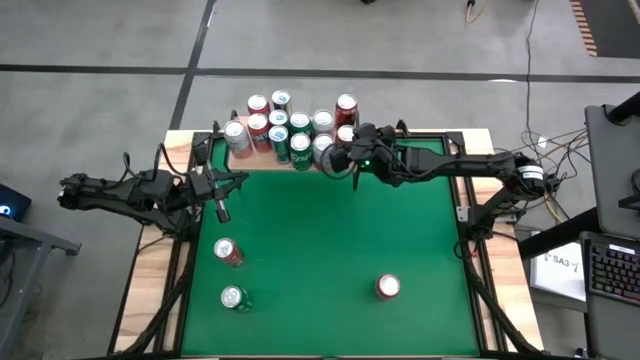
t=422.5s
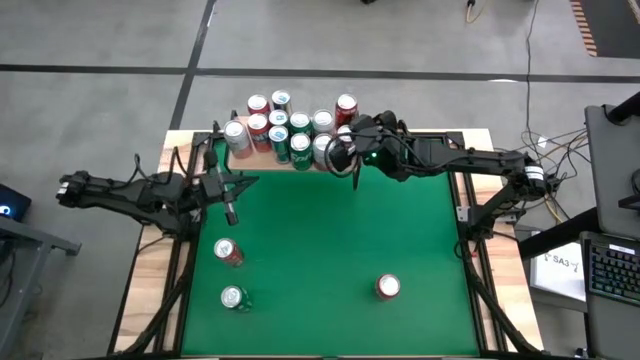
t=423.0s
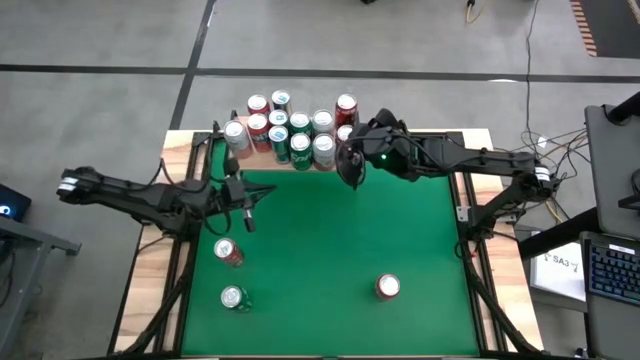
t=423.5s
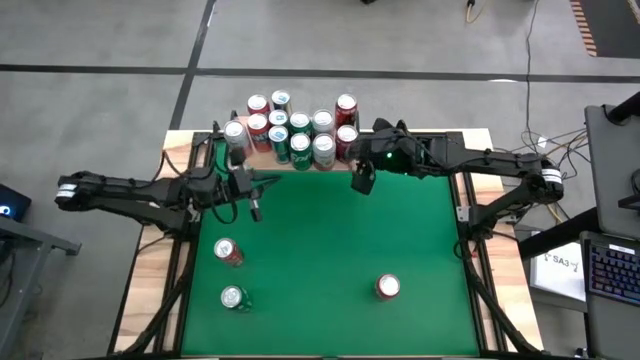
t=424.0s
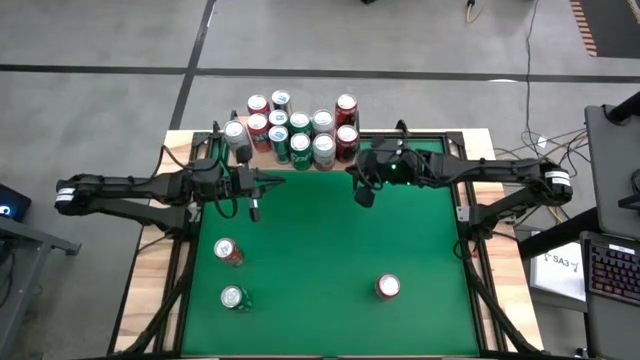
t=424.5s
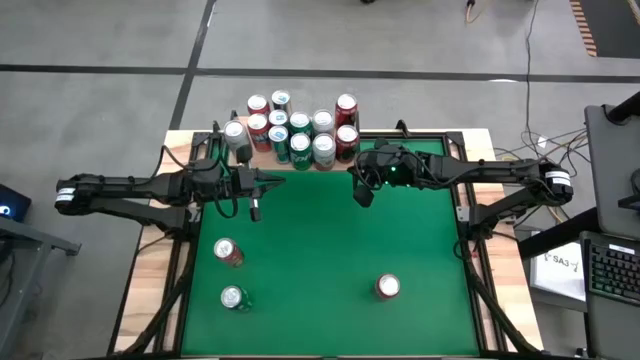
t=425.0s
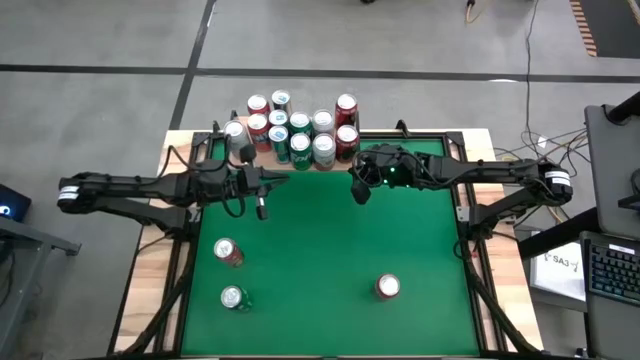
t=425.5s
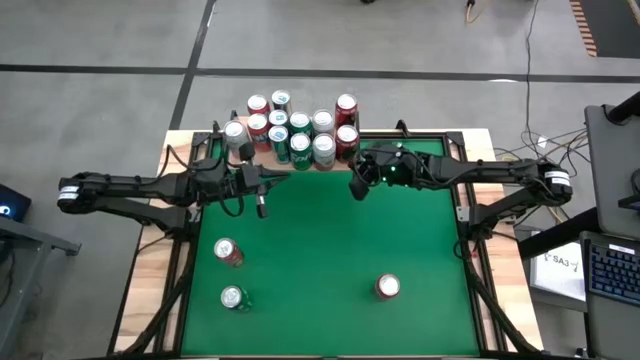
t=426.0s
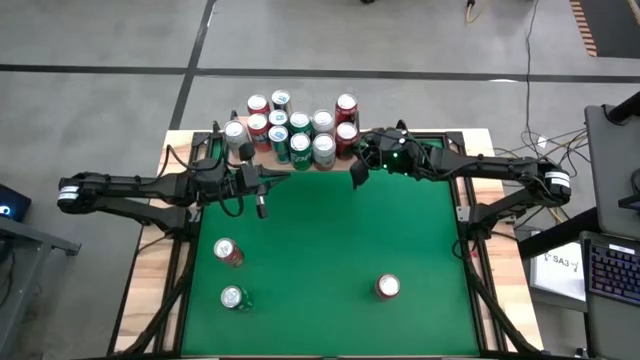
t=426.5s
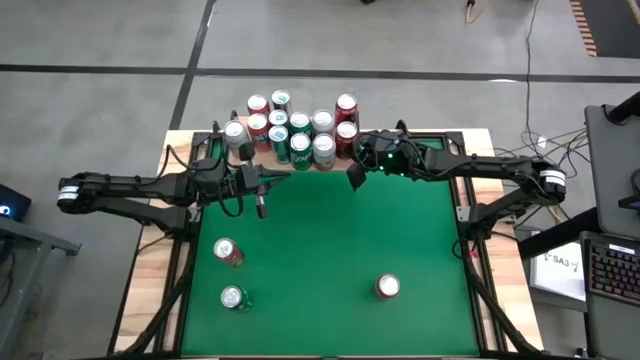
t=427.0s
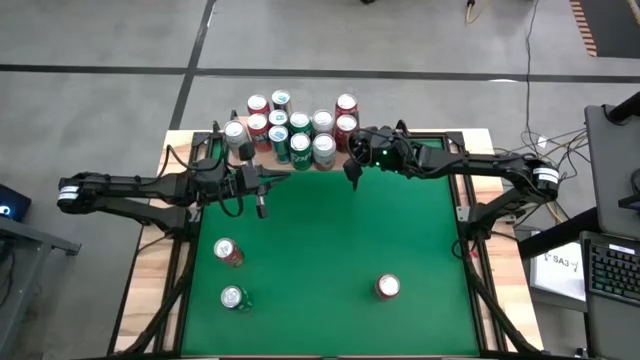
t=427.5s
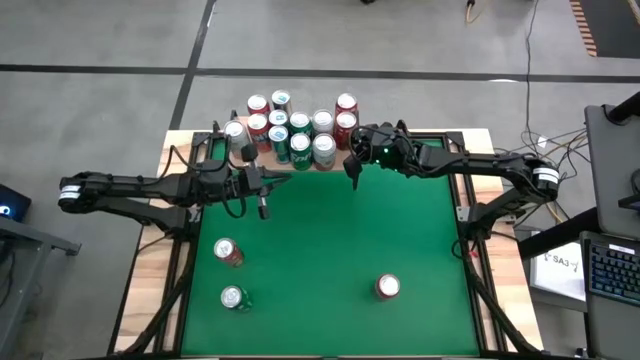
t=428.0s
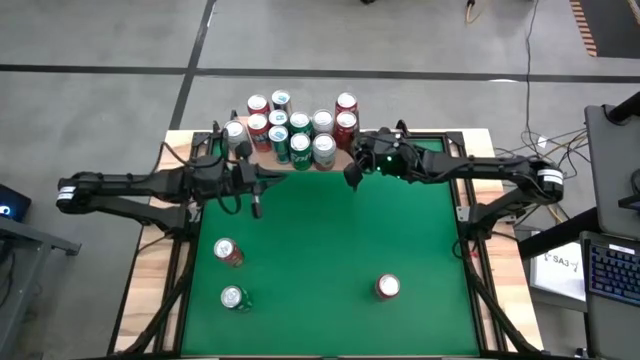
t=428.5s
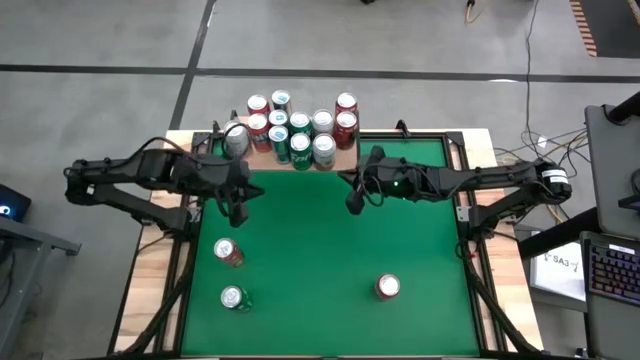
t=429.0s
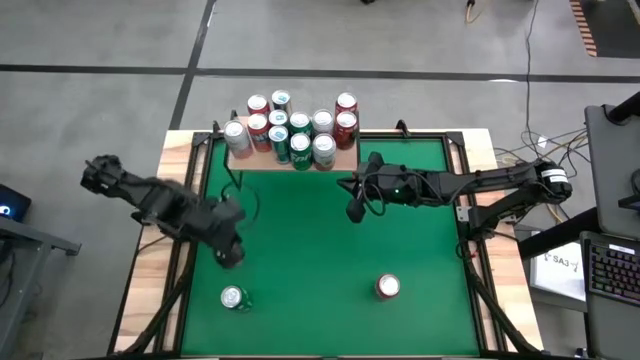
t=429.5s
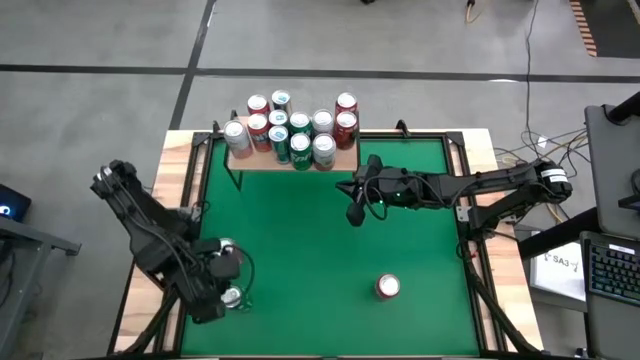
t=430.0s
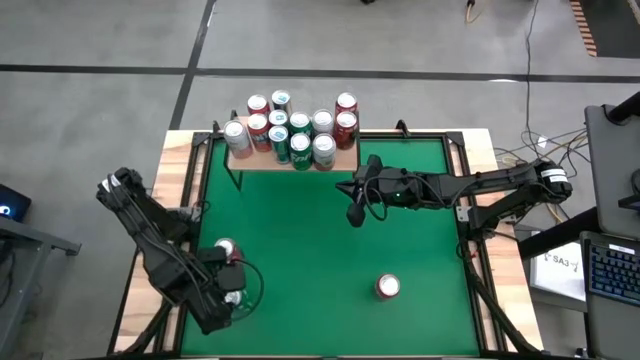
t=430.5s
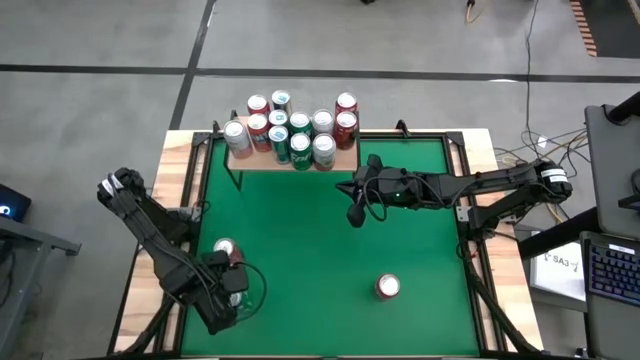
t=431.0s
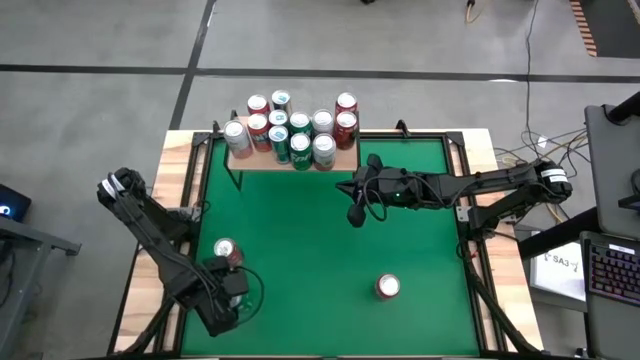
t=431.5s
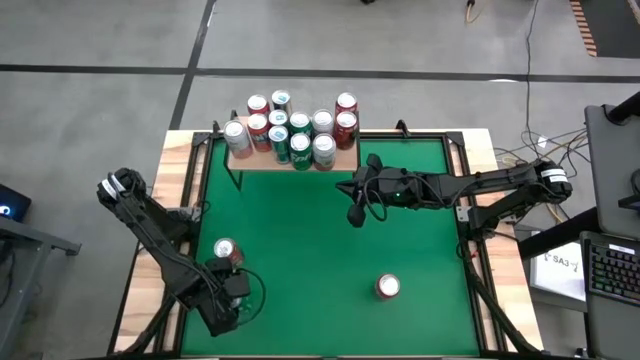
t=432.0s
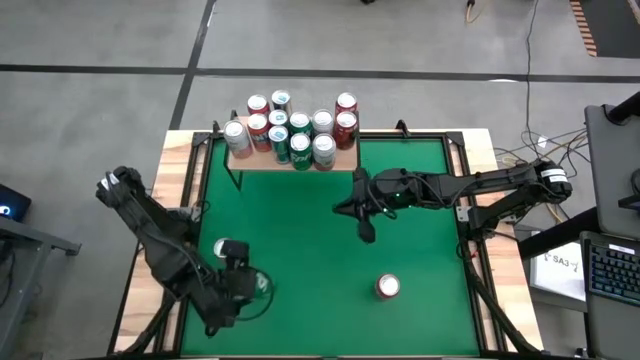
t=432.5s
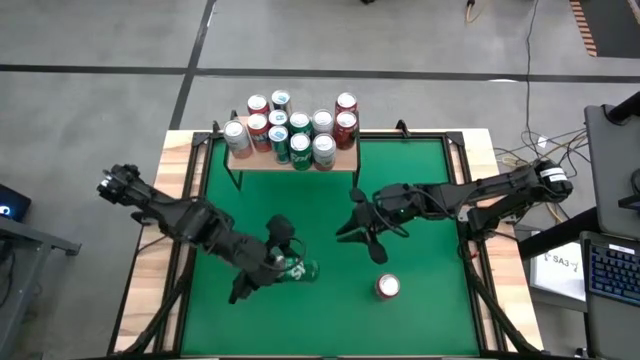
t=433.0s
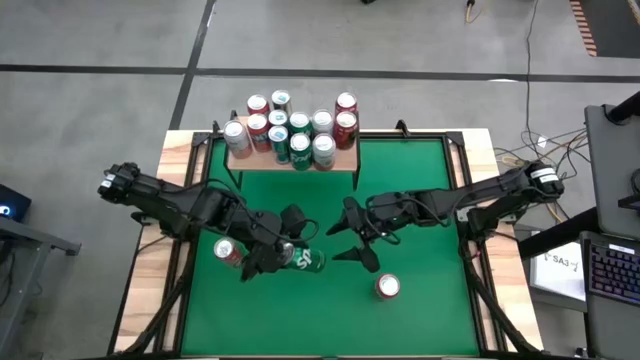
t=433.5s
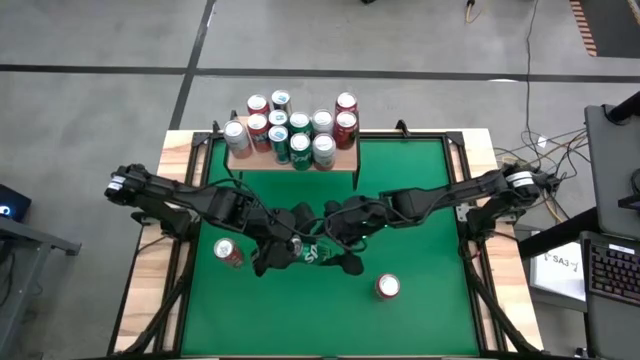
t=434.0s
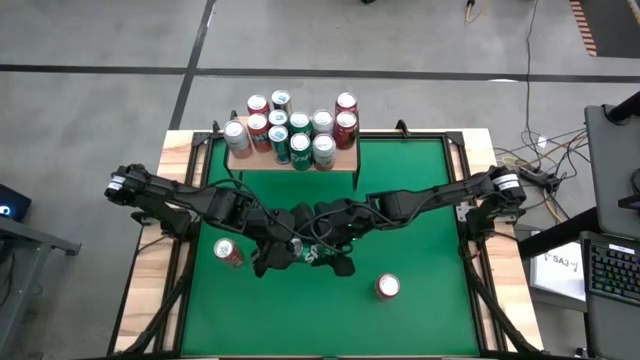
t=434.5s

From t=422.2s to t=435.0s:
Task: Place canned beverage on shelf
Put the green can on the shelf

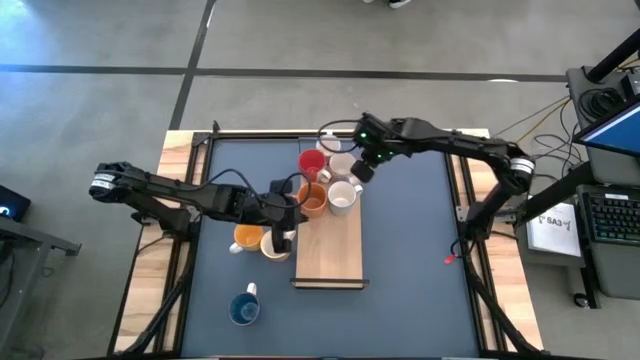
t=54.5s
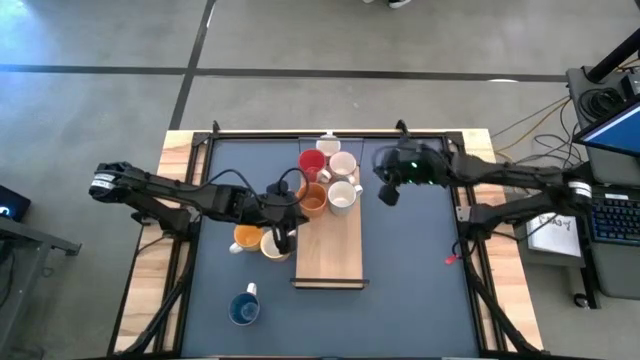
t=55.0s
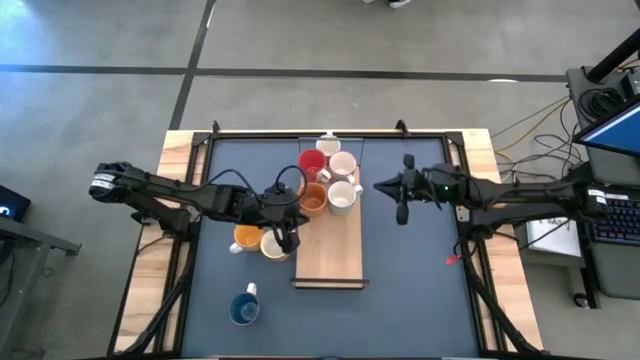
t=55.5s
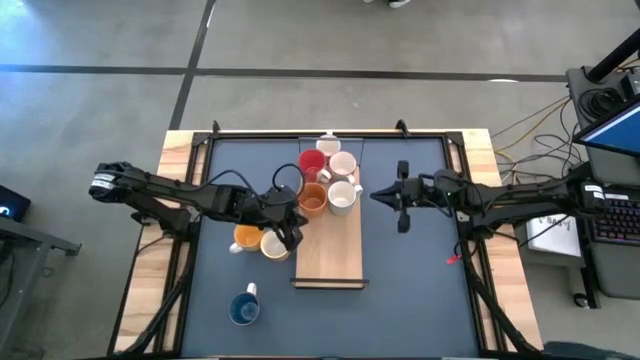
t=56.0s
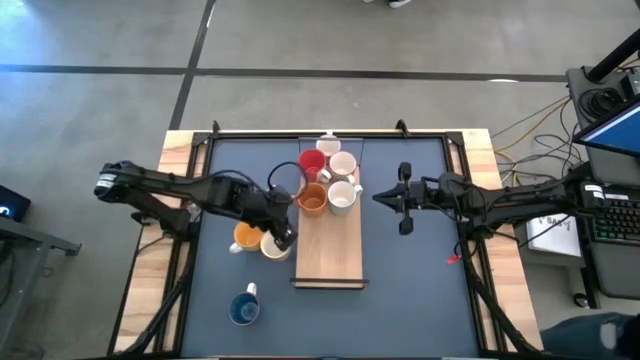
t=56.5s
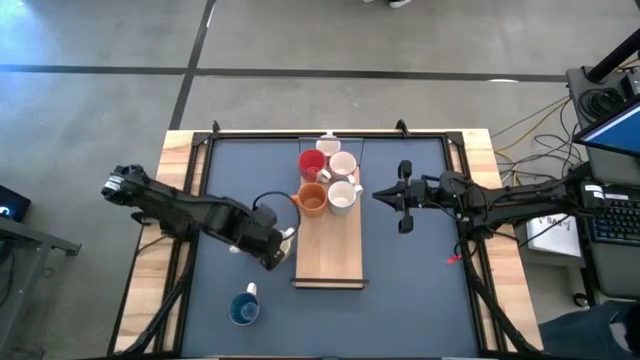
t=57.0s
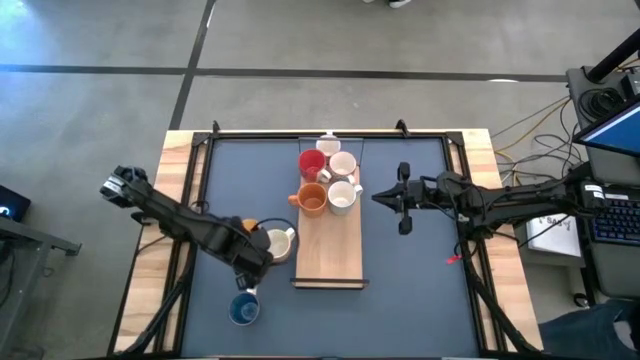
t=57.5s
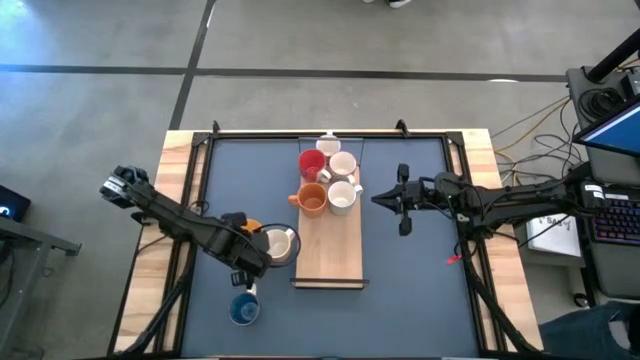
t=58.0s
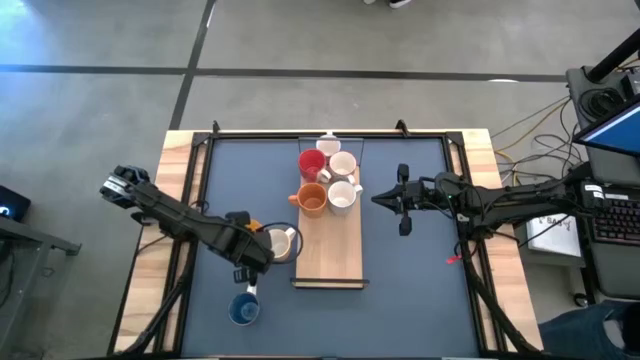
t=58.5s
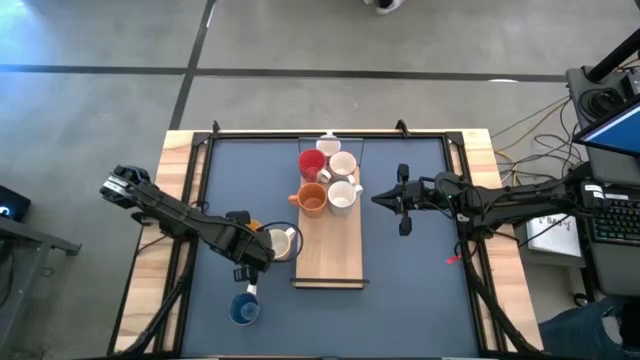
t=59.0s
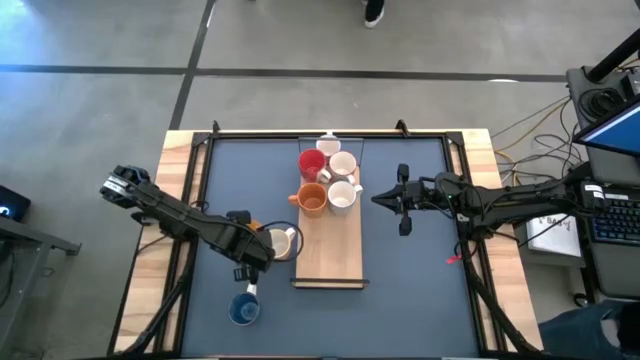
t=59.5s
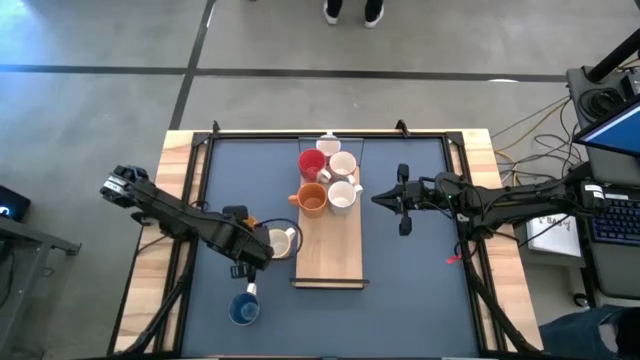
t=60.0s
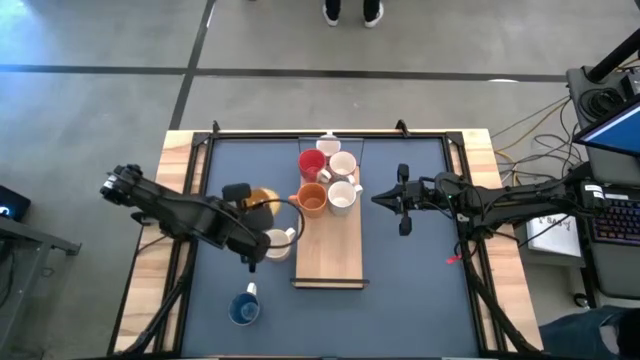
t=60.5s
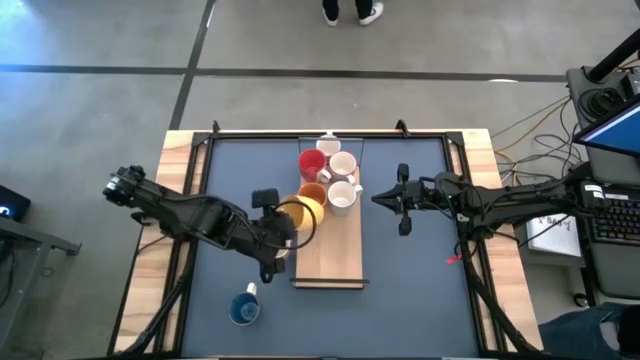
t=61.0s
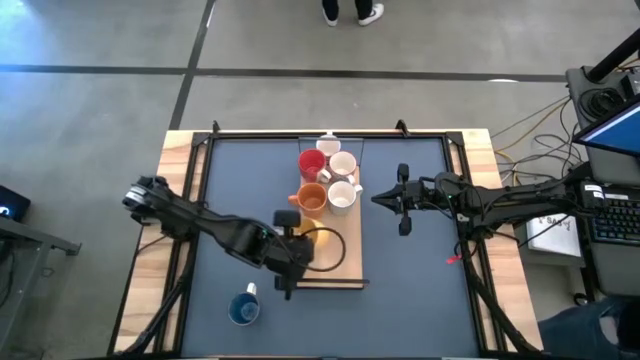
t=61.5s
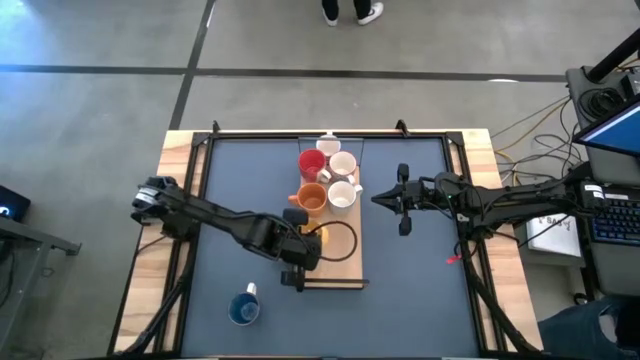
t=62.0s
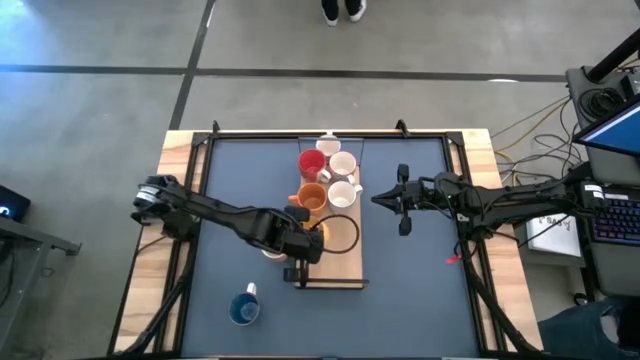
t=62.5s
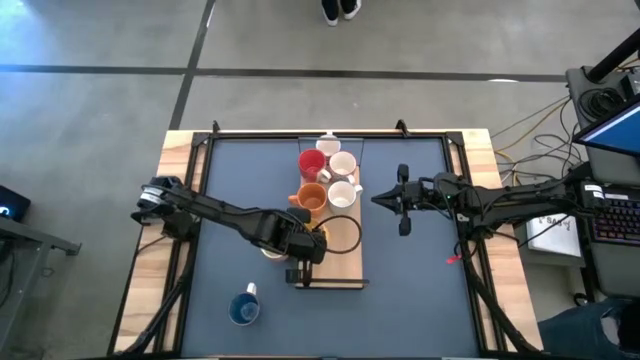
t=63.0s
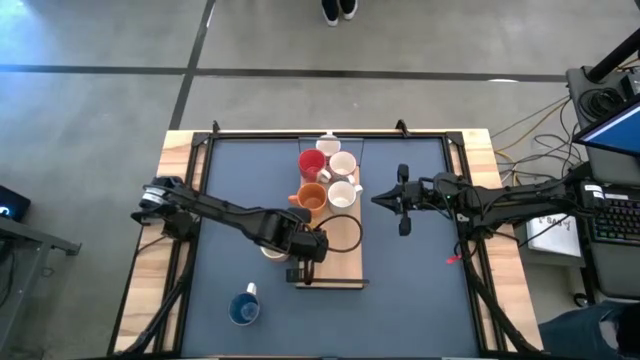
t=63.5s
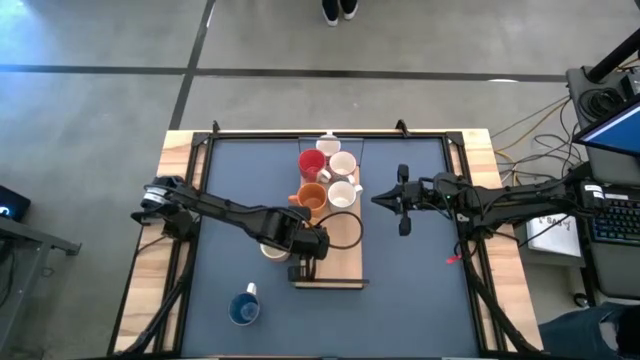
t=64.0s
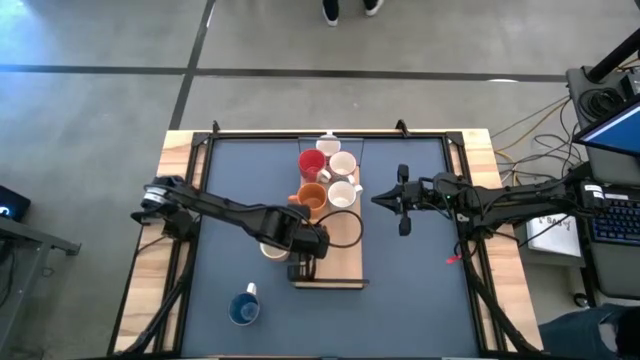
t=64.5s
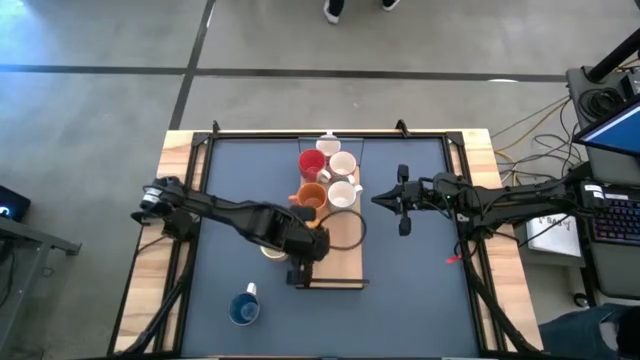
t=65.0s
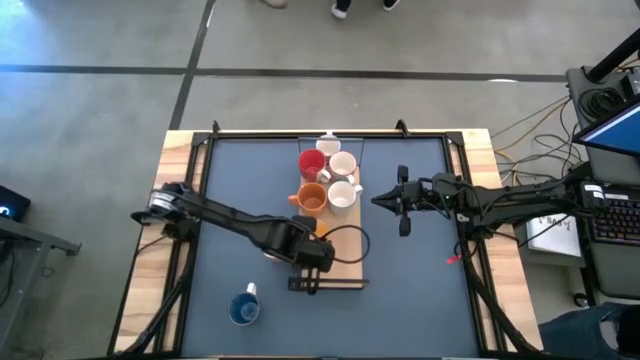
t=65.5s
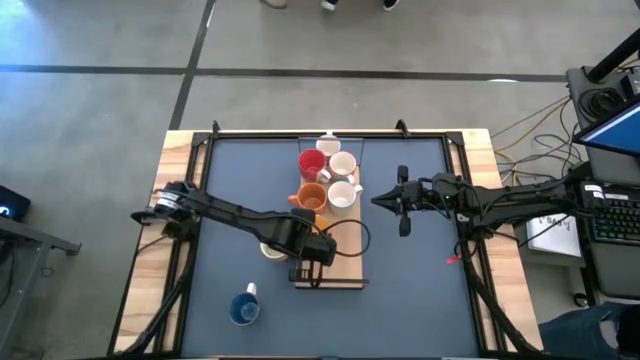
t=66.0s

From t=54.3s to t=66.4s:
Task: Place coffee mugs
Put the yellow mug on the shelf
